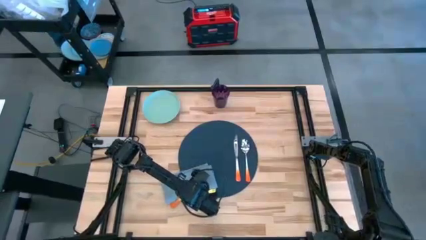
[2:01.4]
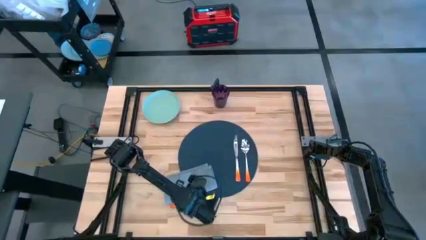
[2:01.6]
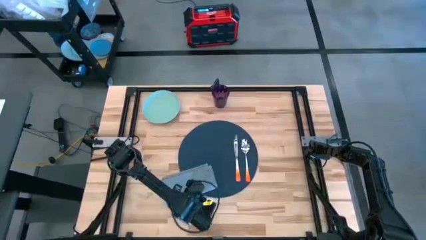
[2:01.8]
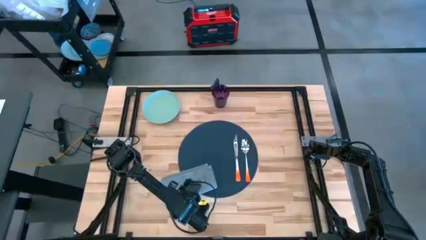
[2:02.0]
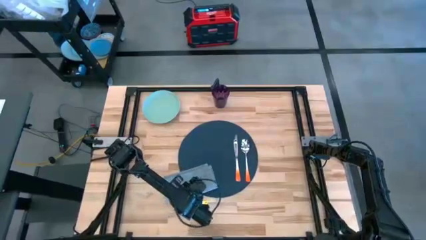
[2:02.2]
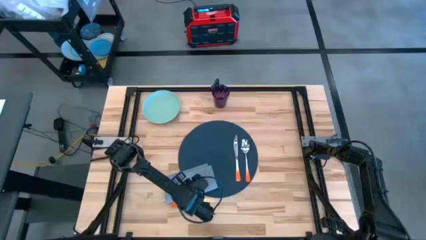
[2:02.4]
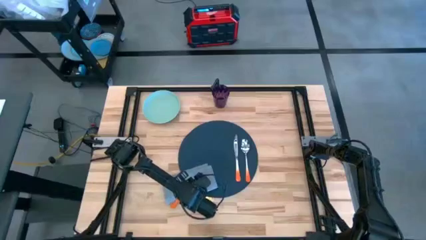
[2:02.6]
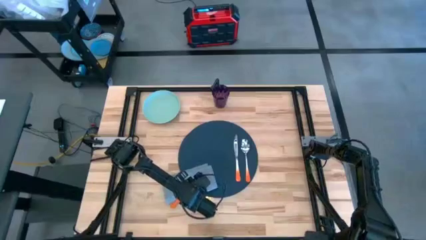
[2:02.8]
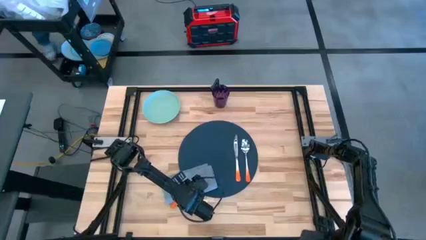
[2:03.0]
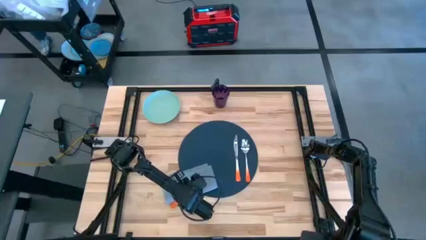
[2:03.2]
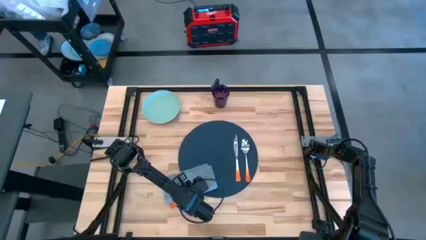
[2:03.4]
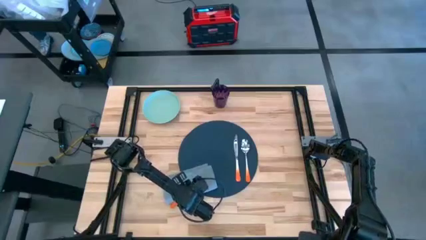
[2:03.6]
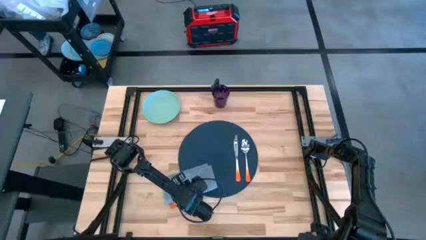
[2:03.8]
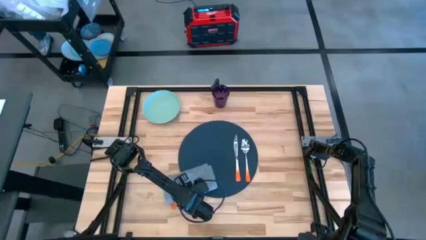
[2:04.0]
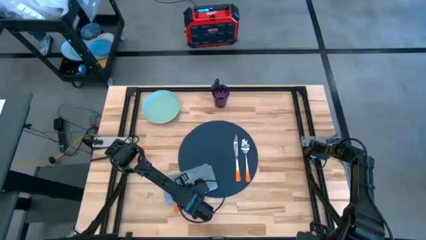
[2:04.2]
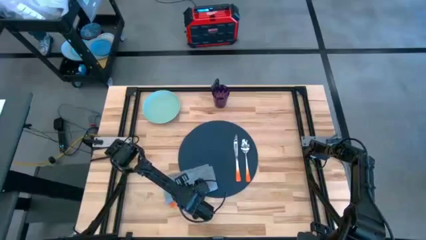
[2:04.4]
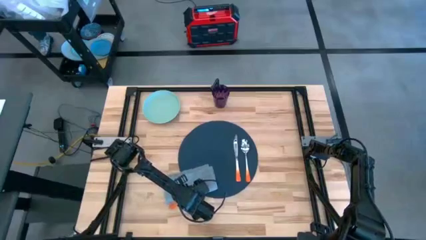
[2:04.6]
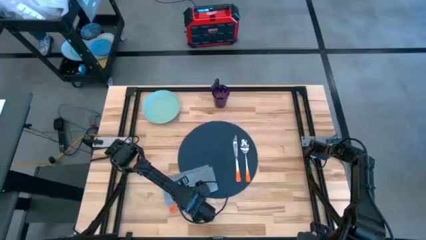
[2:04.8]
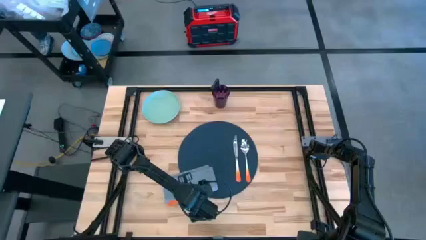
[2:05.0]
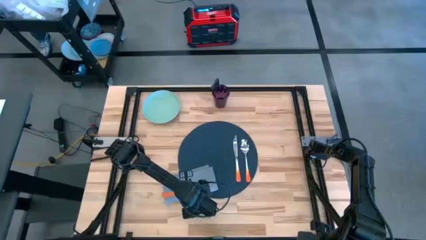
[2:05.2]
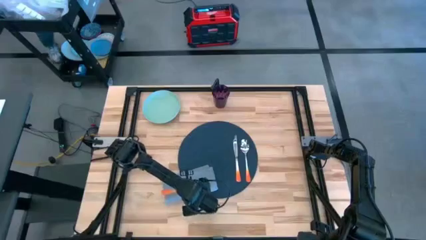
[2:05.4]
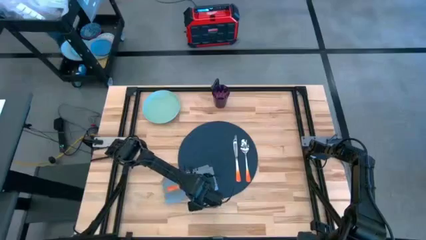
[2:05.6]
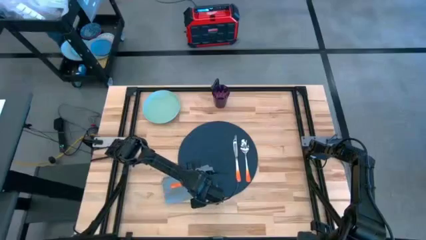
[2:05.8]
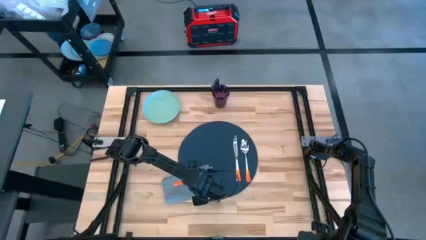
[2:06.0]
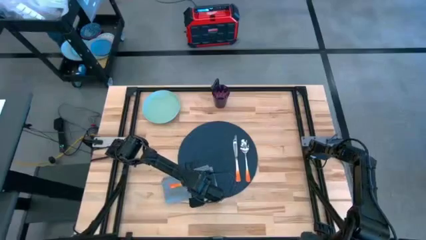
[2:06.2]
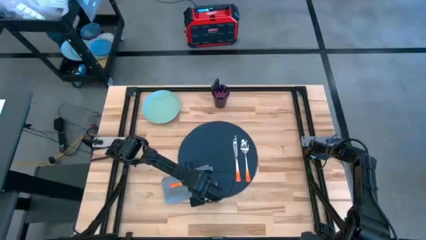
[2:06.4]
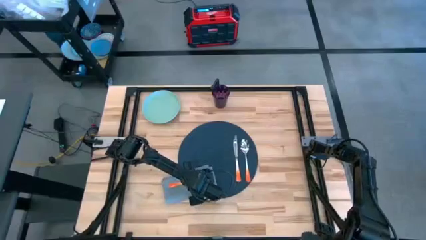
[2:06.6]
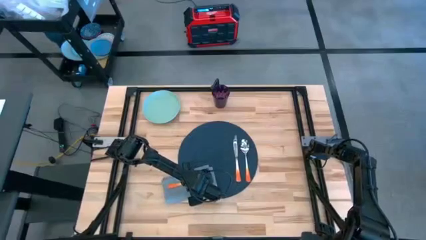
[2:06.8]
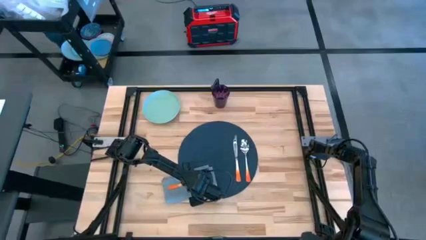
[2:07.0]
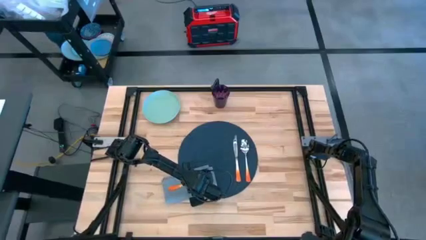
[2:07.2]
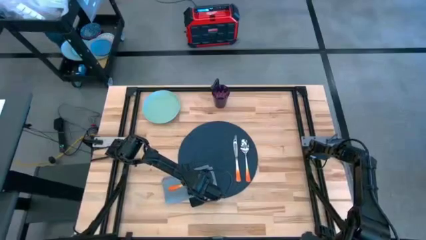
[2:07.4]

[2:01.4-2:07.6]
Task: Set table place
Put the orange fork on the table napkin

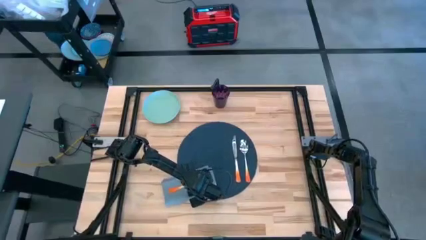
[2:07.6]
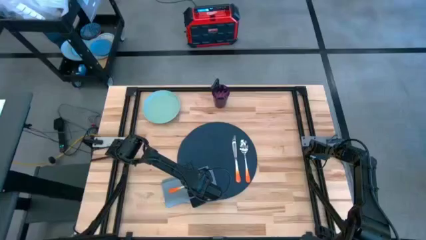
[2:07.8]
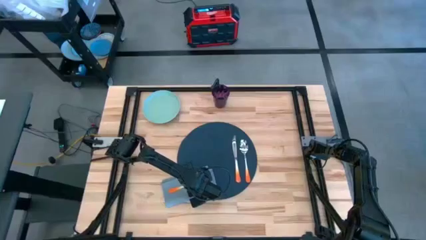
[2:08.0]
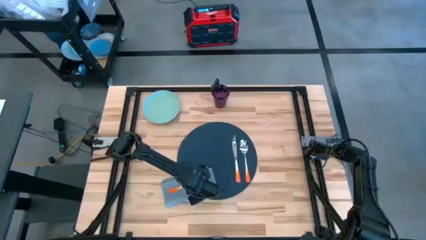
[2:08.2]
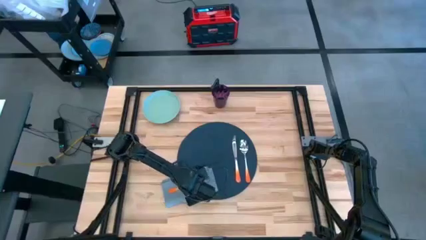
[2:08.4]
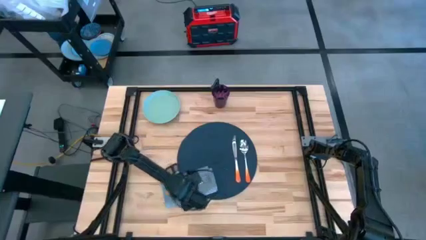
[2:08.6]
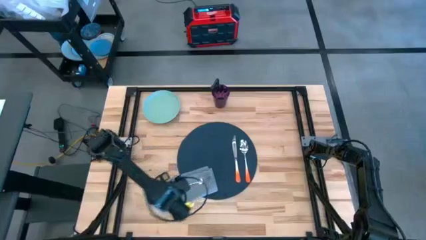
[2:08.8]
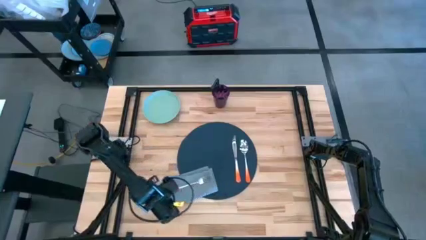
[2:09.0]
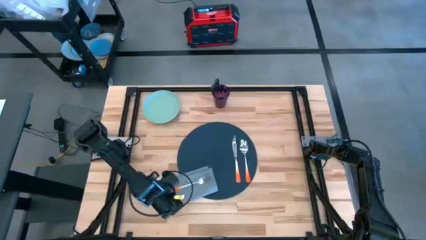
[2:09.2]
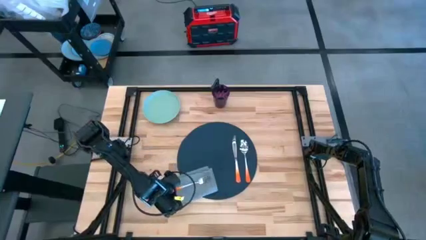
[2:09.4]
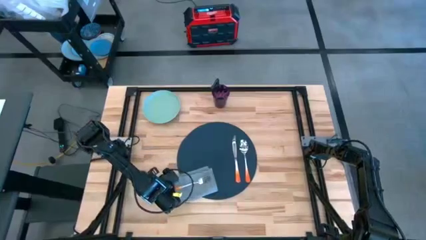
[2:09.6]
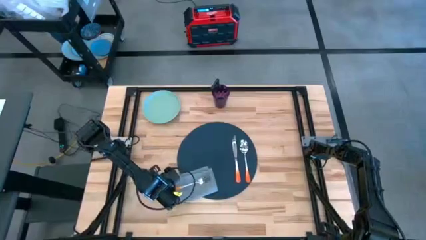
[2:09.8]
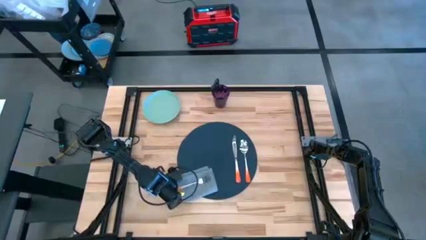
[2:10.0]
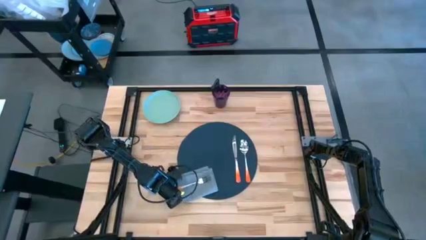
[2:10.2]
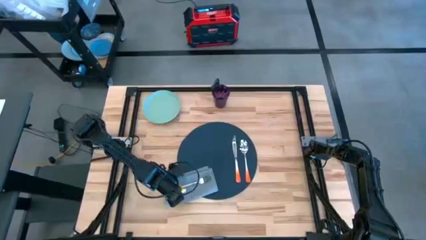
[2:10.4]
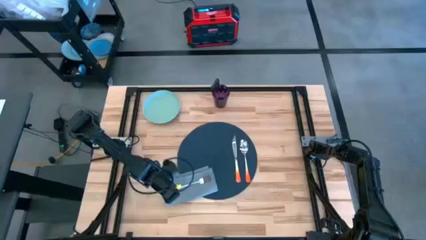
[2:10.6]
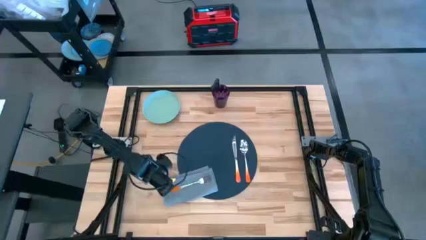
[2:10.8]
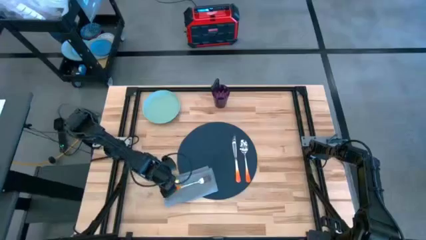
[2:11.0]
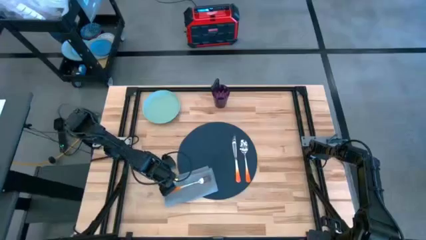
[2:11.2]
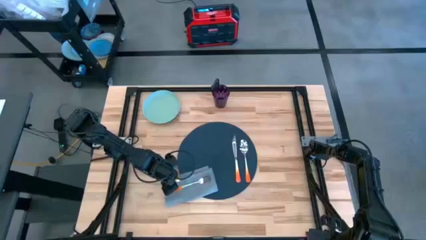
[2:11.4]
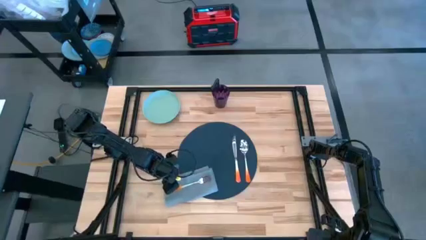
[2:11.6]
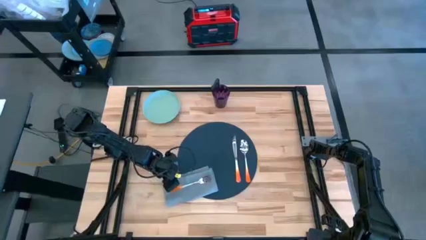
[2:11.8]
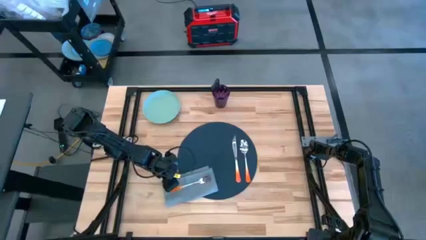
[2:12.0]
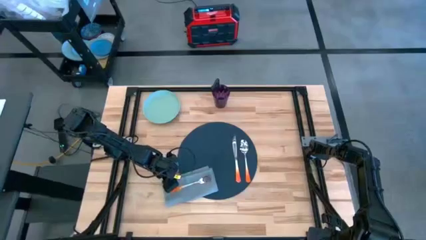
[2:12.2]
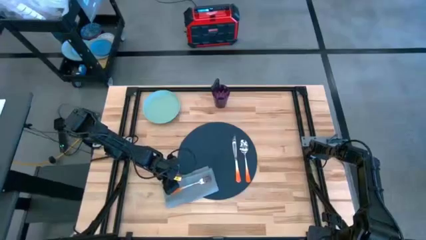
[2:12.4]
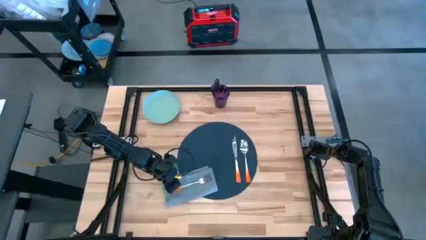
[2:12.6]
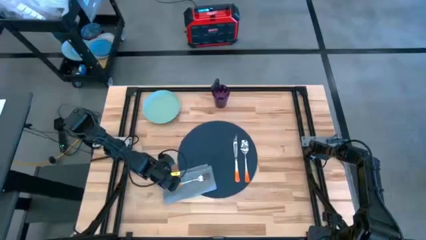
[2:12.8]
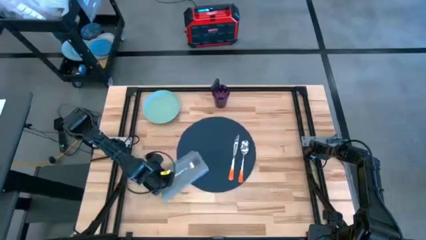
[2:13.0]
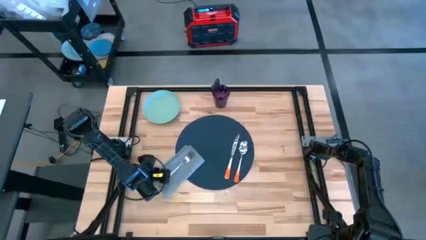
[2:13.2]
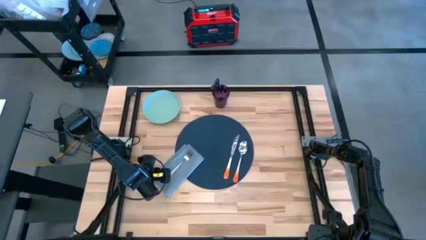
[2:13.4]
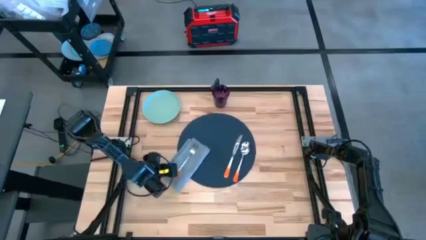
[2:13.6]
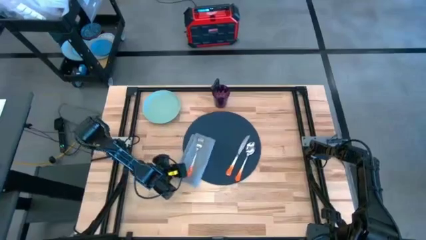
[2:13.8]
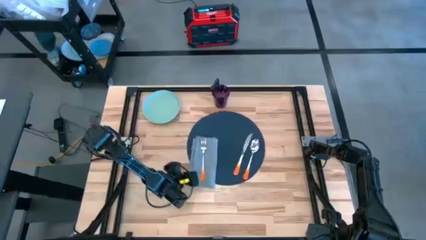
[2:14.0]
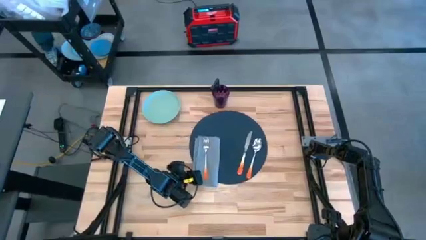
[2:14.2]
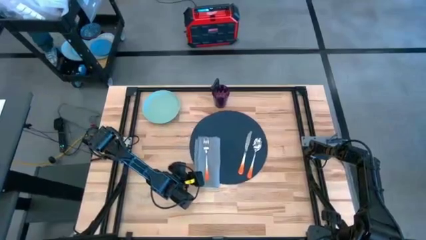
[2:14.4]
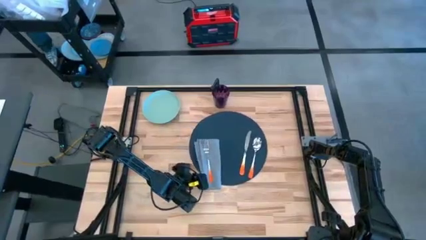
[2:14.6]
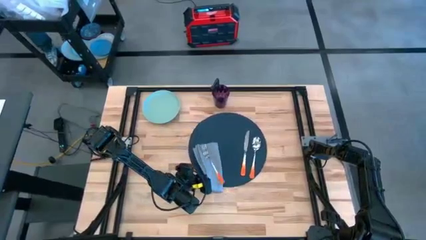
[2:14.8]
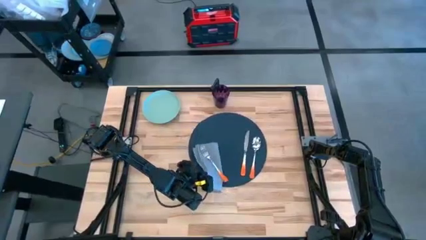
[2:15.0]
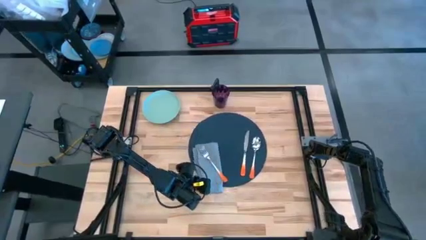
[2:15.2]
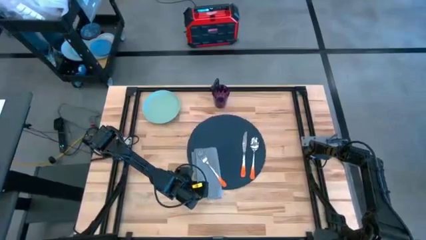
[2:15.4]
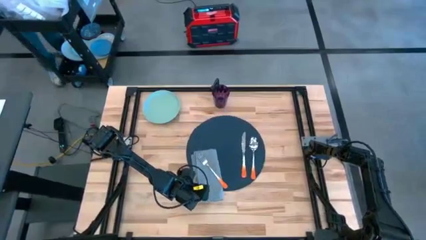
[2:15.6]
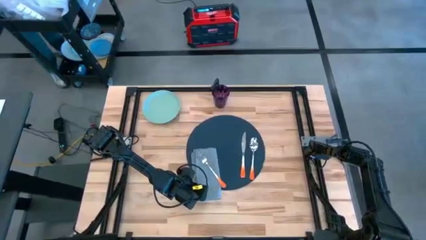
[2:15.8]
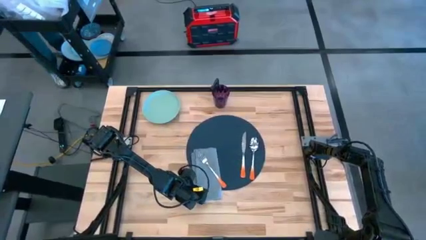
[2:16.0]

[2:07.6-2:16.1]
Adjust the table napkin

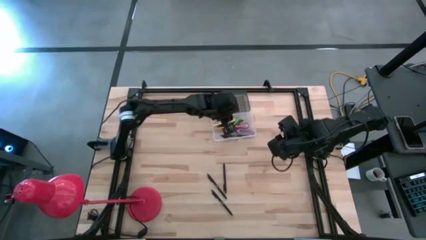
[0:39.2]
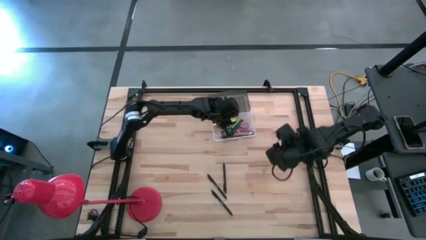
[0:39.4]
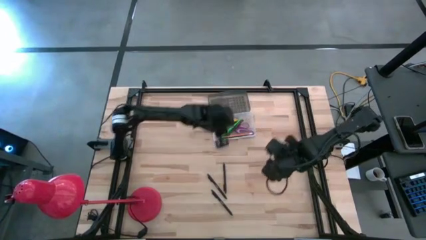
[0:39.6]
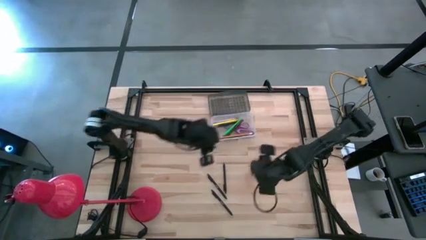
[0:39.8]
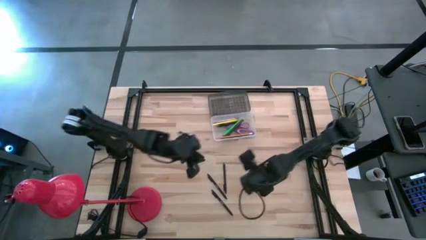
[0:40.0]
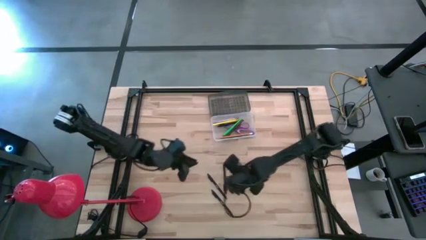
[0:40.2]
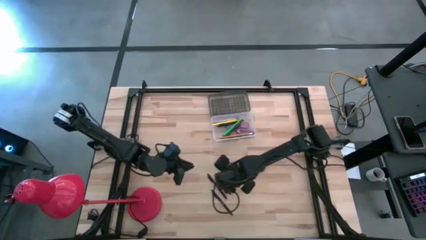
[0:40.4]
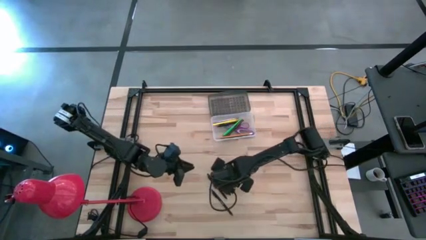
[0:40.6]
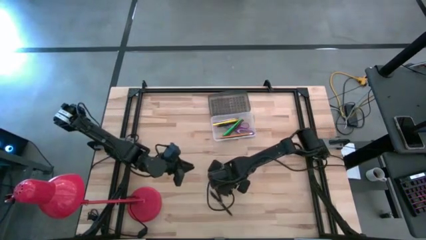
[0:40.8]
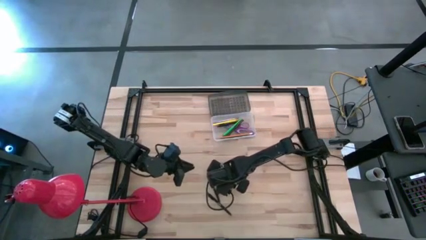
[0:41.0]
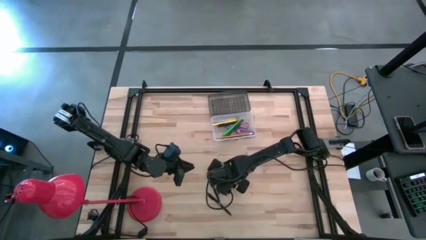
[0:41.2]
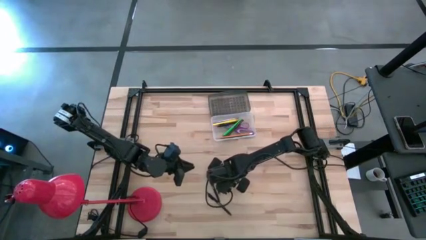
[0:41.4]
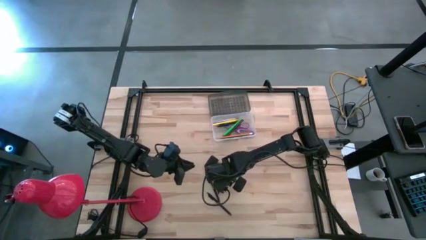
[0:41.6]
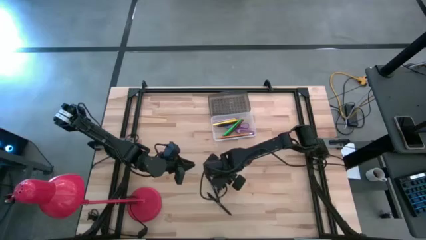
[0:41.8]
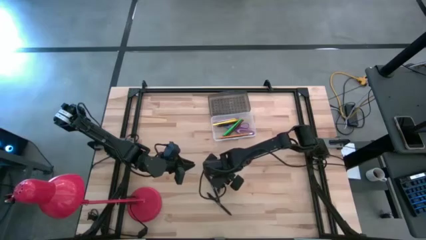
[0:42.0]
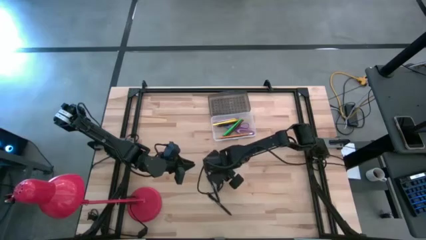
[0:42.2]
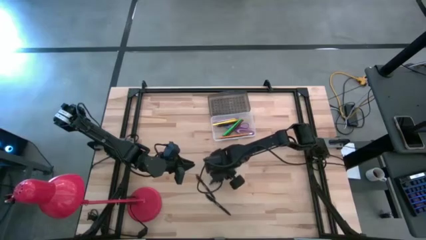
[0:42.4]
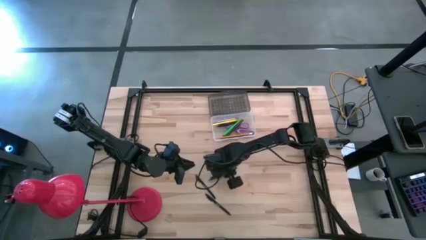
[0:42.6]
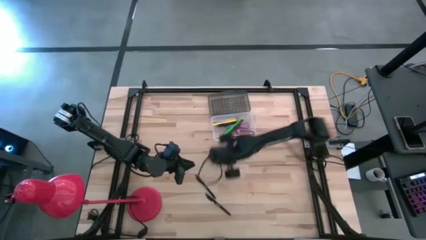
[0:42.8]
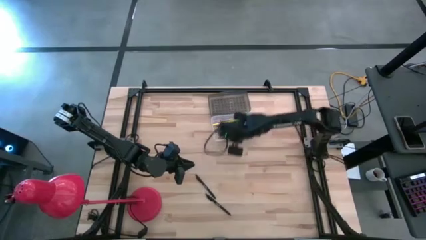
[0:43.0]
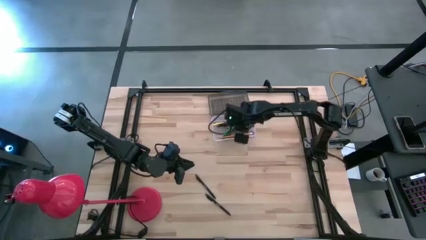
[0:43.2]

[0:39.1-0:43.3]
Task: Pick & place school supplies into a supply box
Put the black ballpen into the gray supply box
